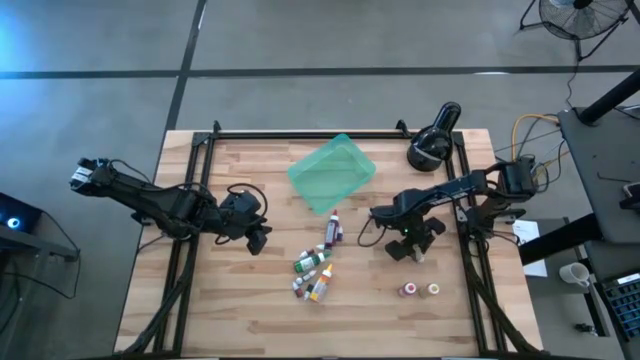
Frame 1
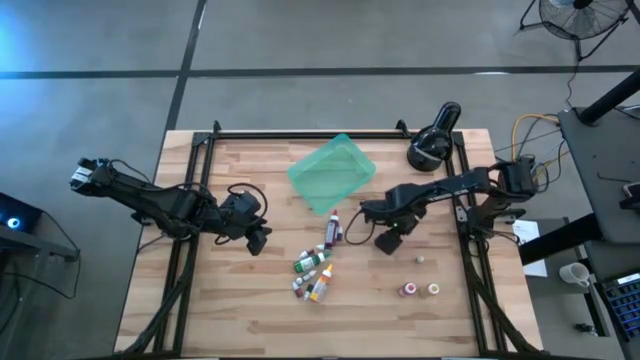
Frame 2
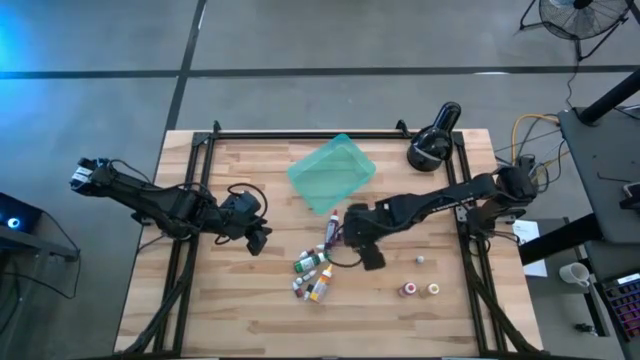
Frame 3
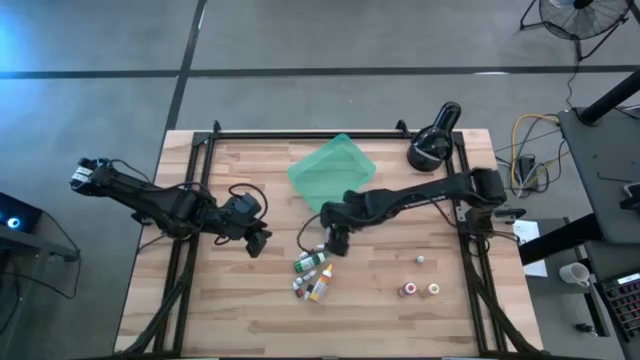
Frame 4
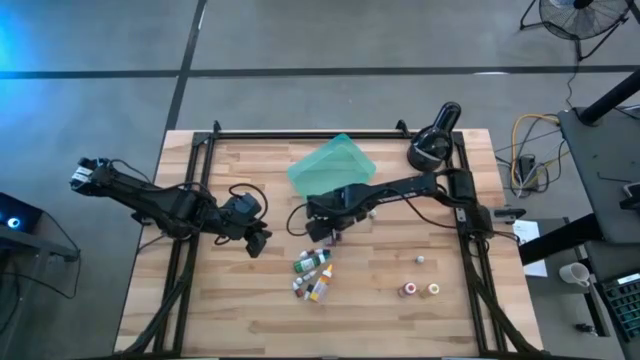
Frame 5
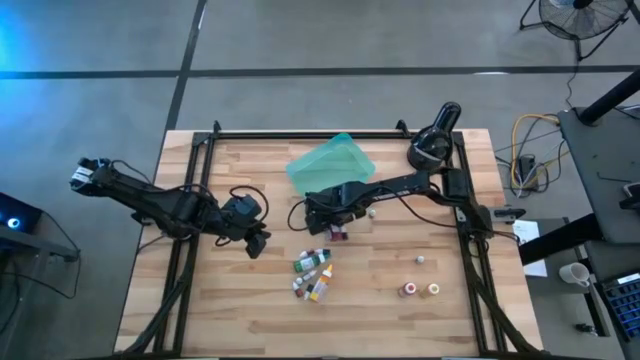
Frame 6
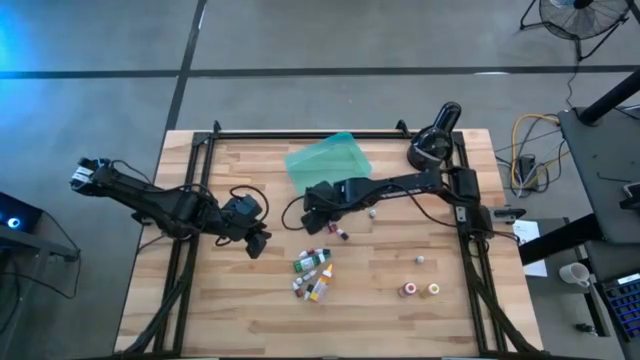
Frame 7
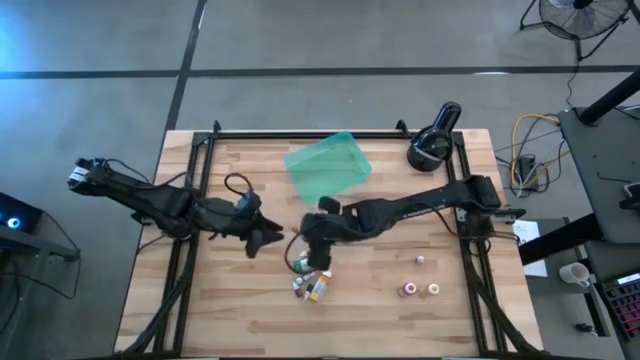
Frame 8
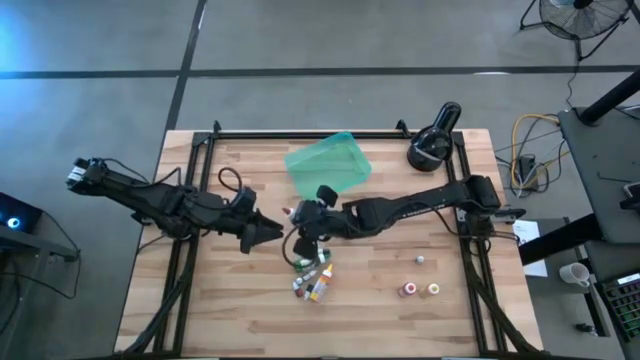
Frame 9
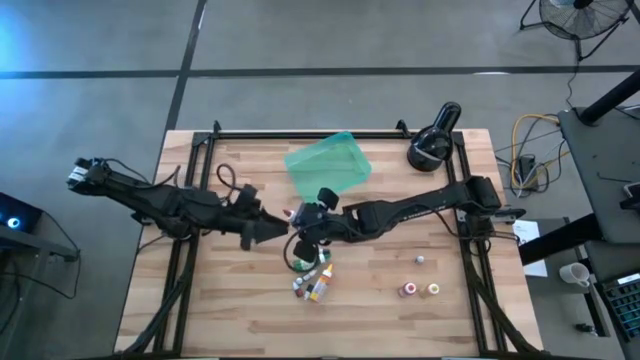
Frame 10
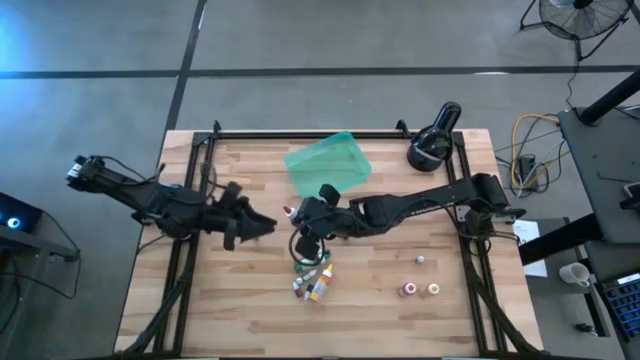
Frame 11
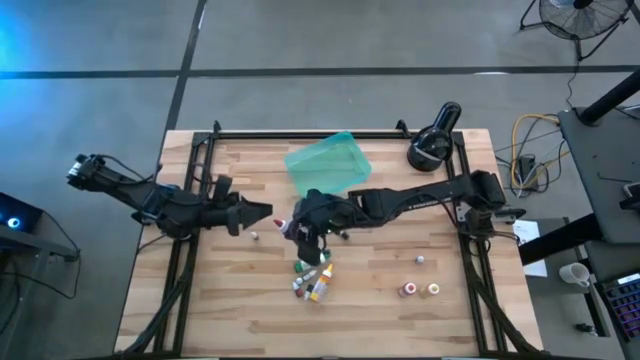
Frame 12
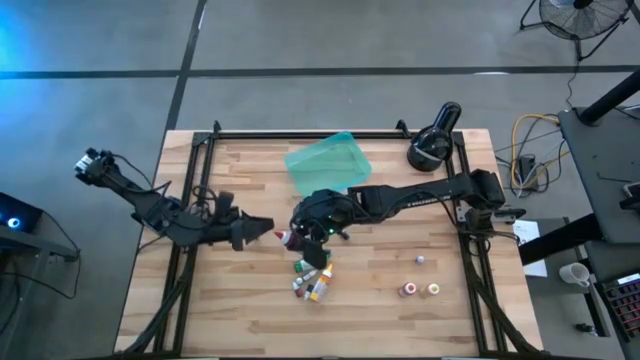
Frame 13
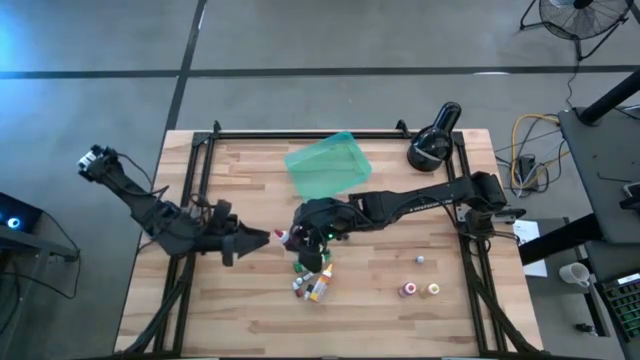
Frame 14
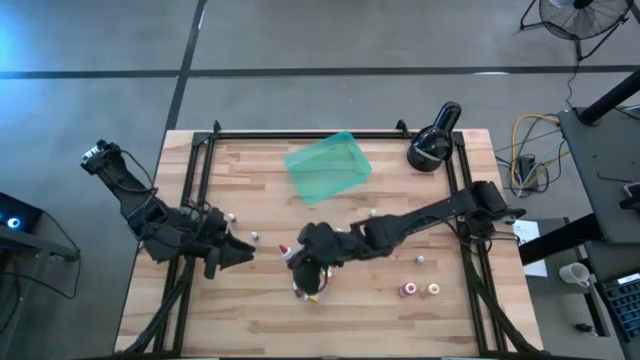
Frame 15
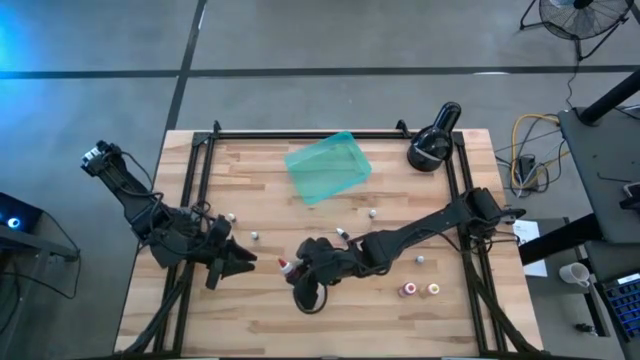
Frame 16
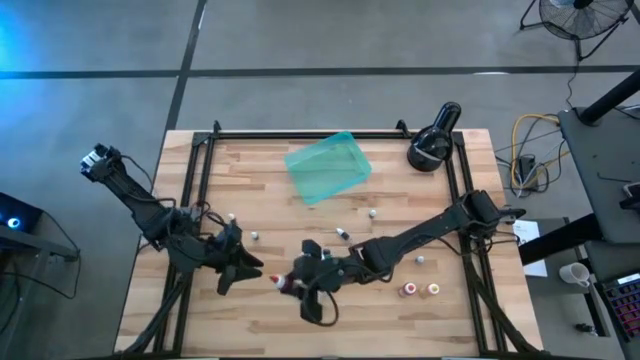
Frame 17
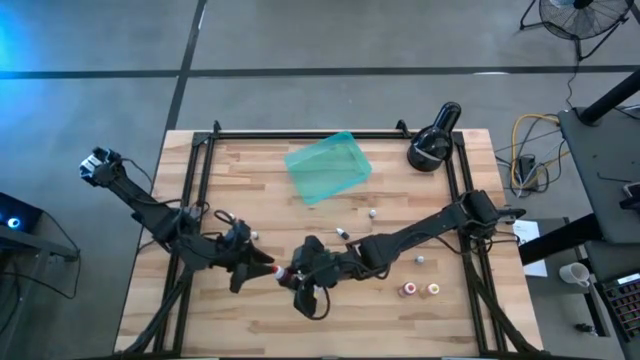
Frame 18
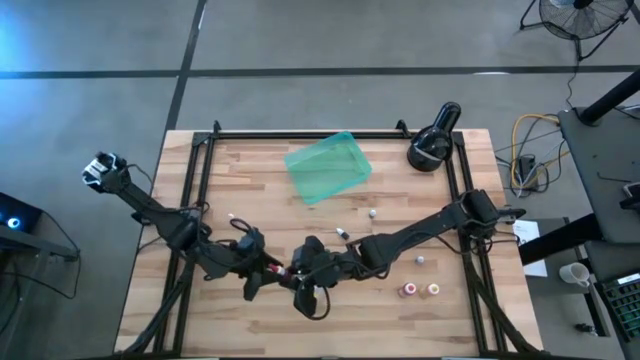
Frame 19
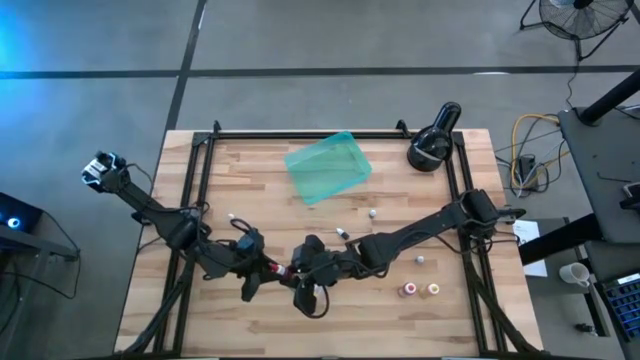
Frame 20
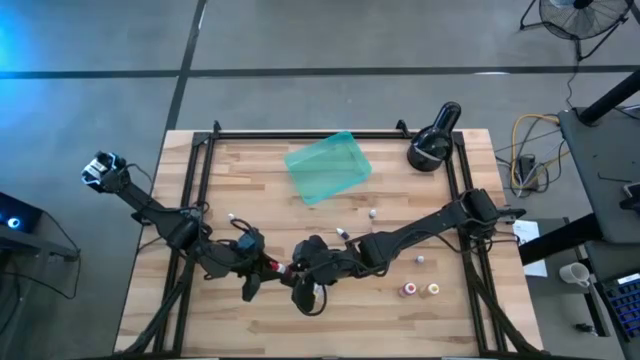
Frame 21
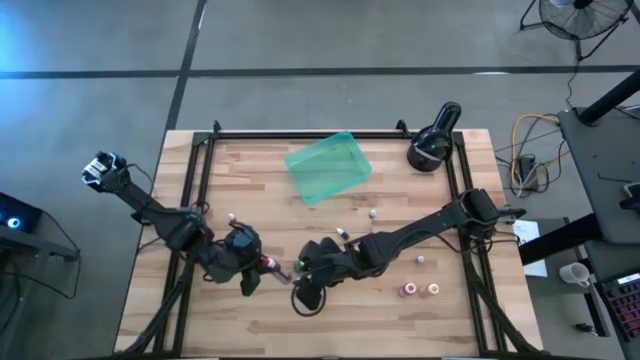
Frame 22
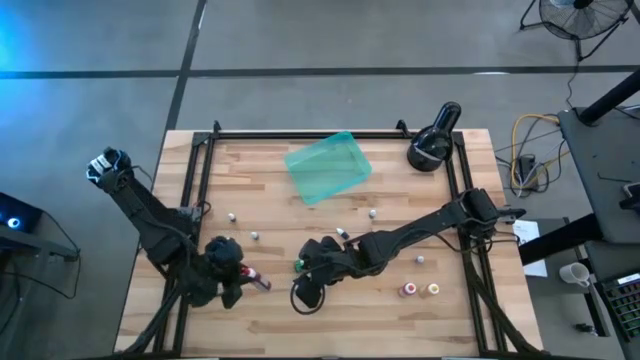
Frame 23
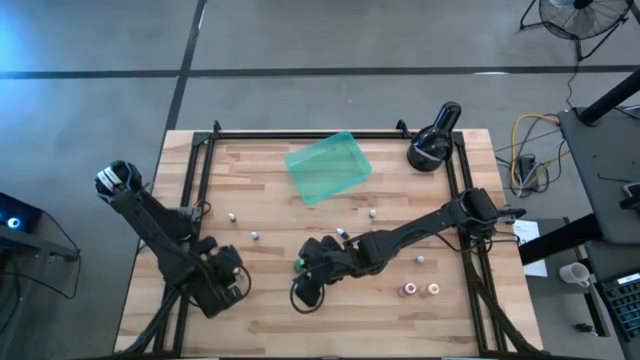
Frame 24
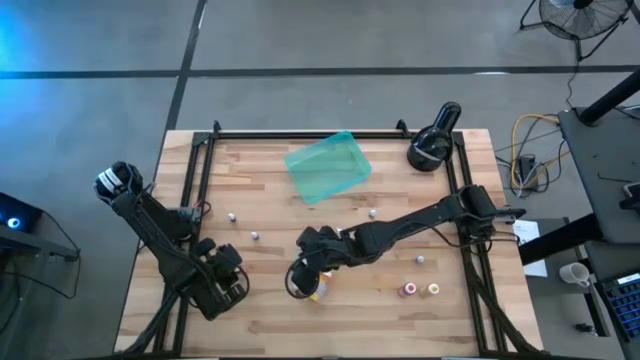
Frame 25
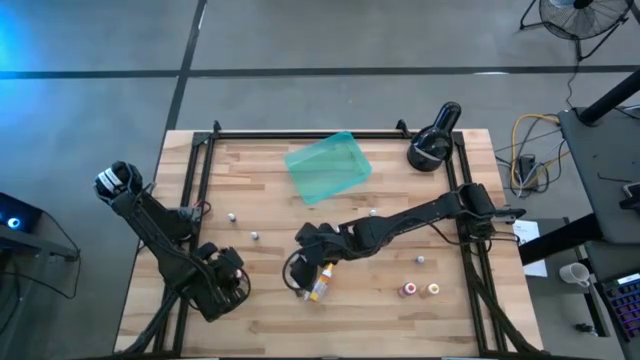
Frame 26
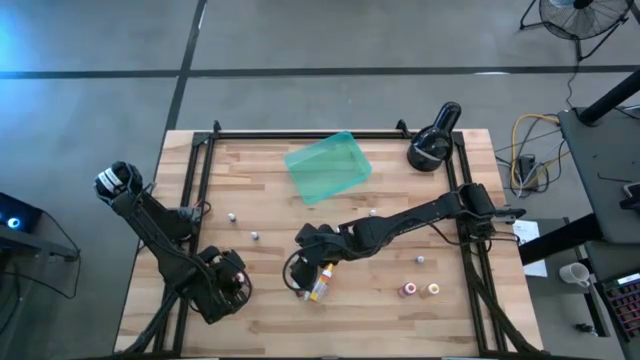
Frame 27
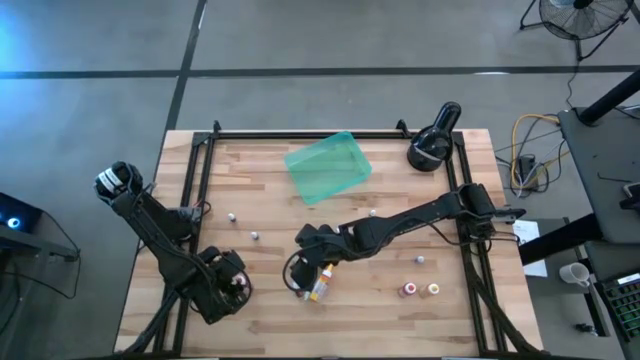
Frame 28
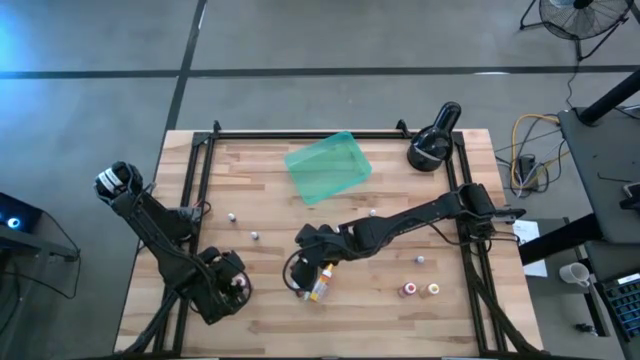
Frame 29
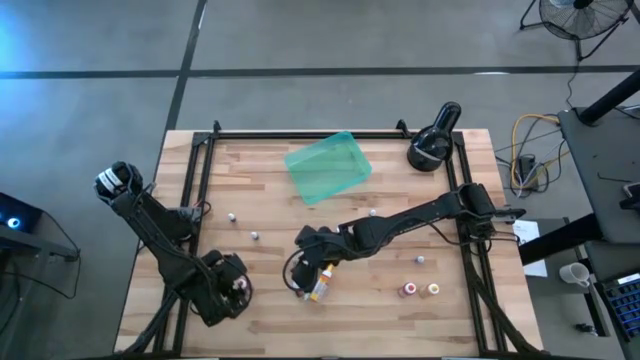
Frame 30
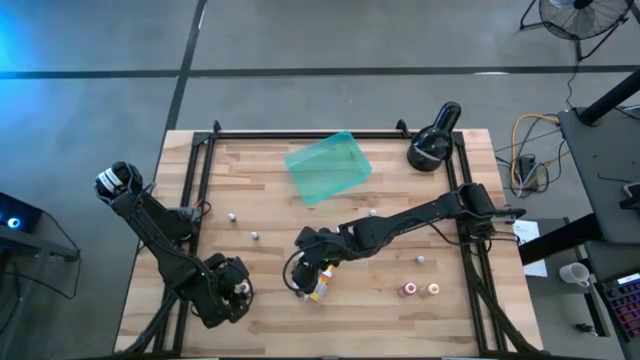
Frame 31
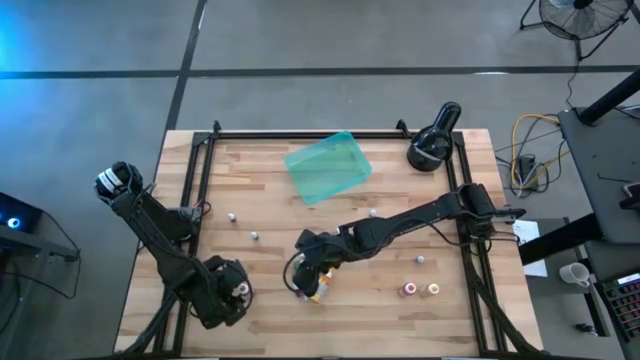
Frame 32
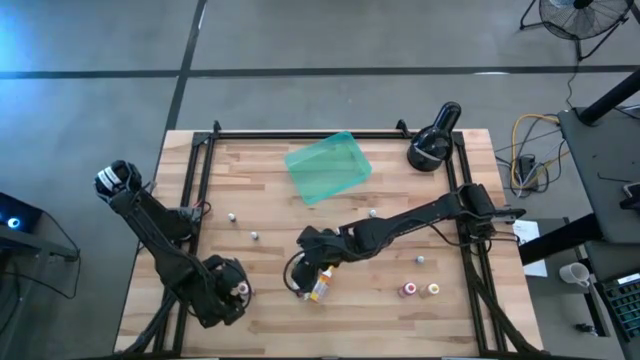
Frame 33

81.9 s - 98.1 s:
Task: Pick & Place food coloring
Adjust the blue small food coloring bottle

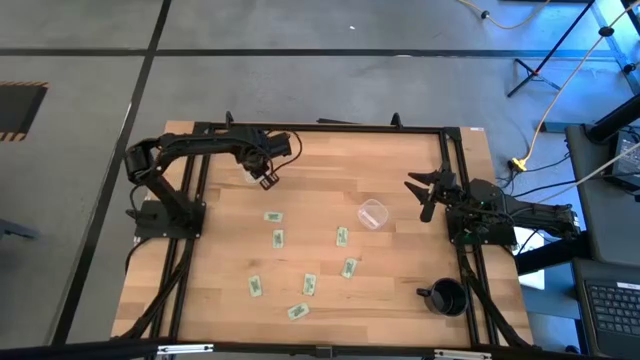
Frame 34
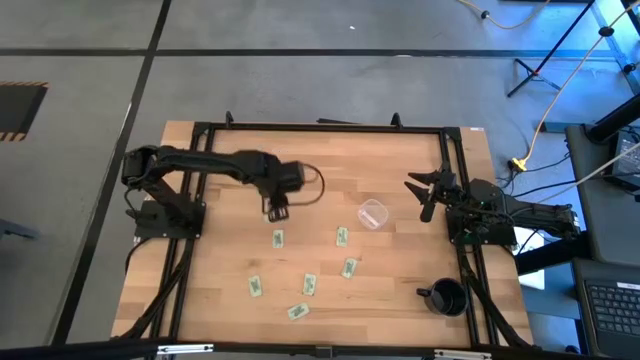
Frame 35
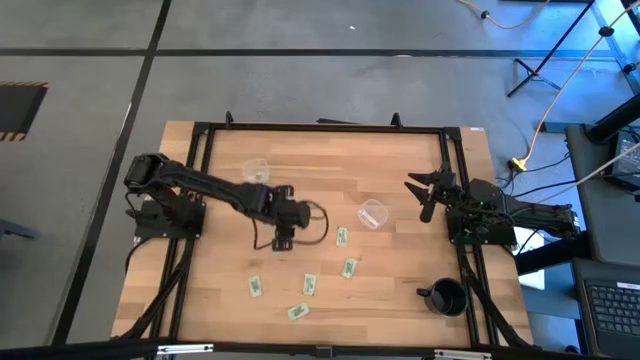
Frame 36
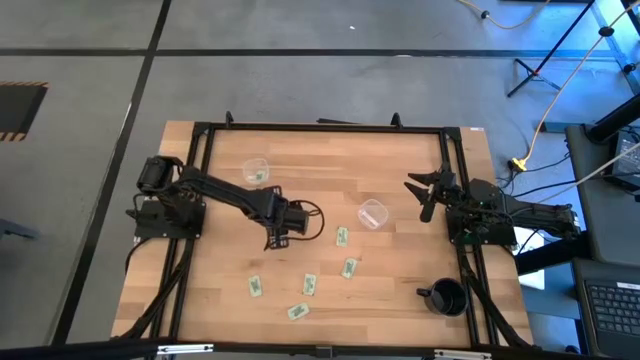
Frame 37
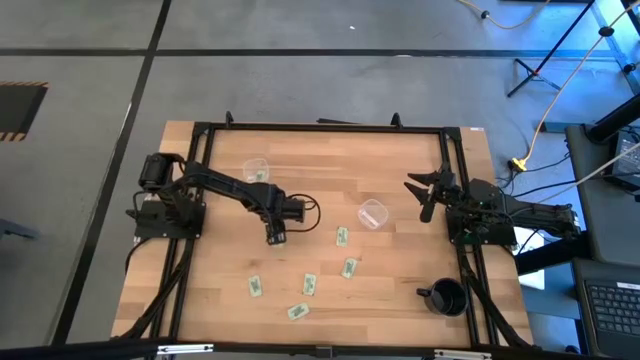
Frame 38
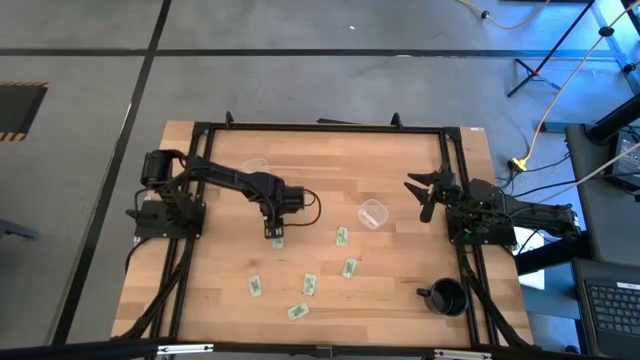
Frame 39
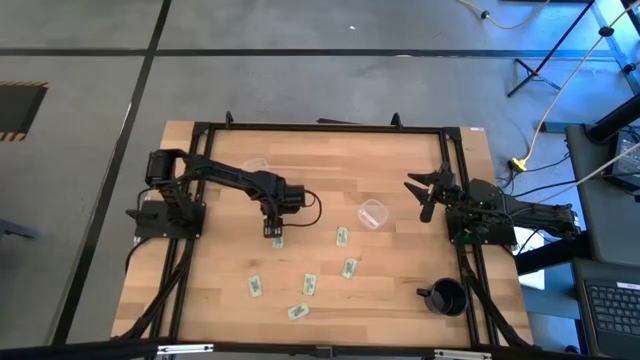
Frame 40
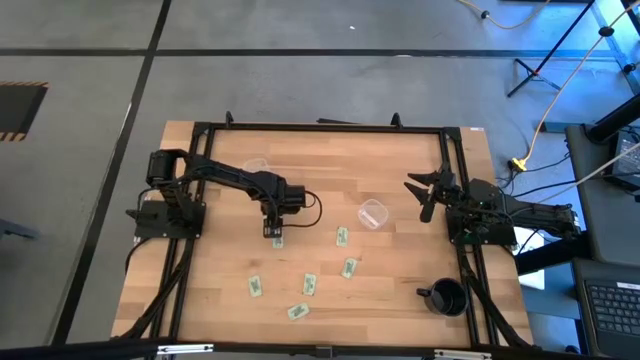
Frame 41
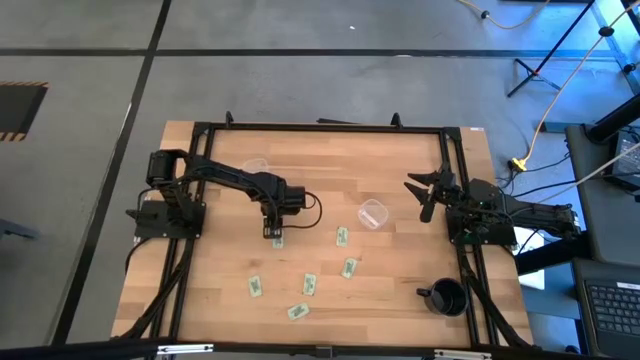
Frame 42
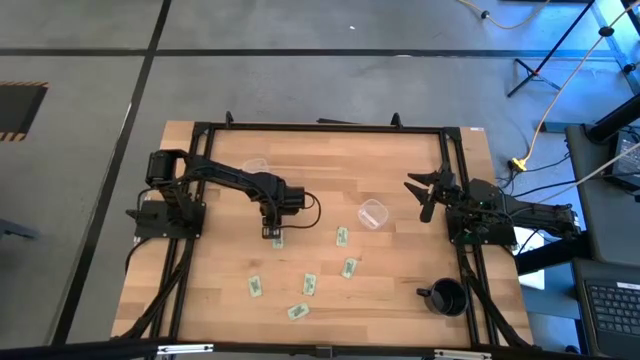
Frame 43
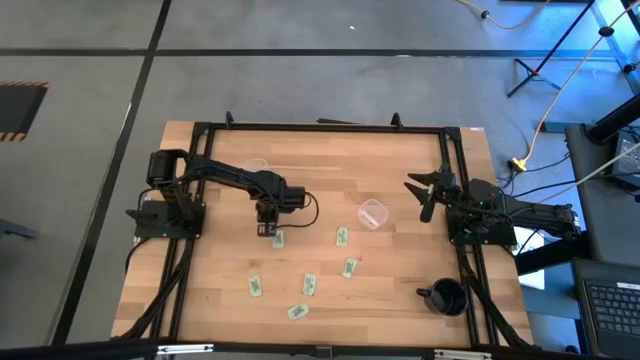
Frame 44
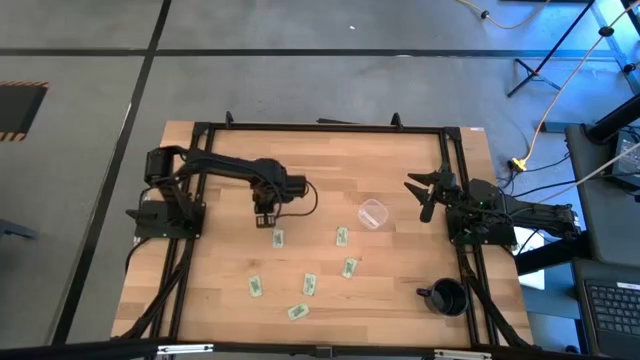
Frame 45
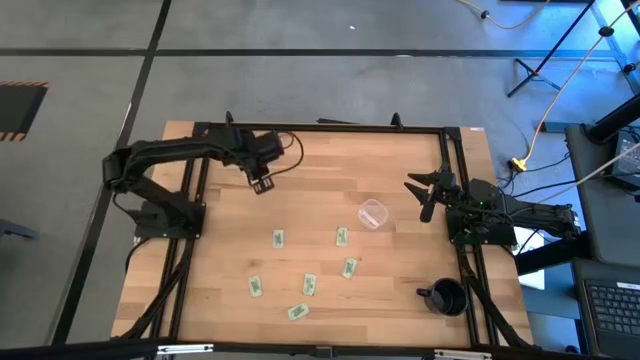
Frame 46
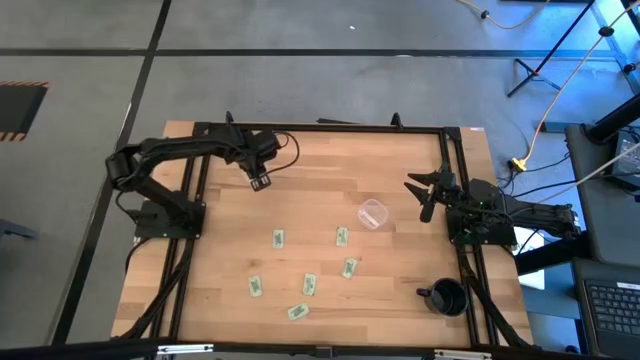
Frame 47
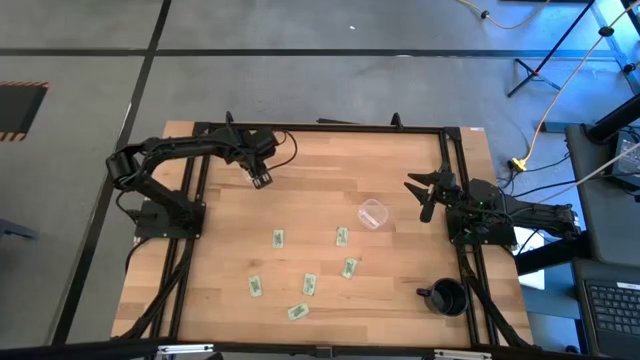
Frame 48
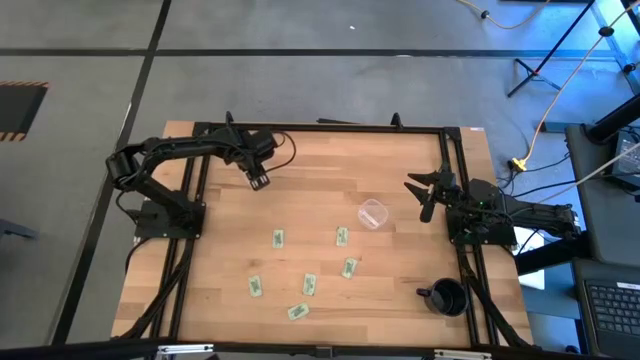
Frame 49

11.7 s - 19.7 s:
Task: Pick and place Stevia / Truvia into bins
Put the green stevia packet into the left white container
